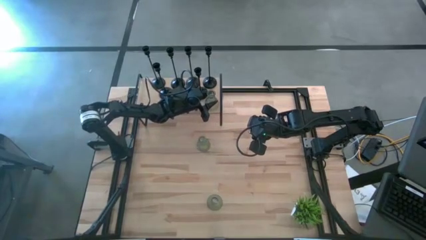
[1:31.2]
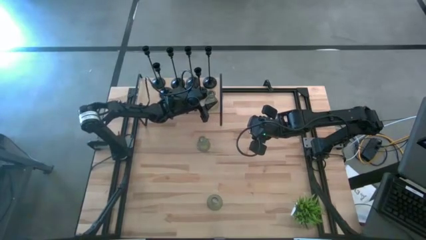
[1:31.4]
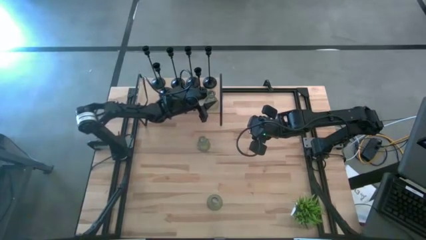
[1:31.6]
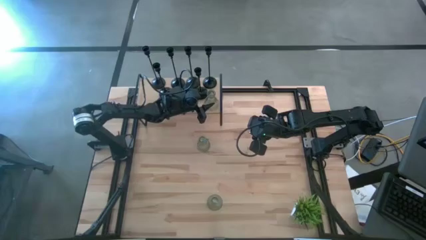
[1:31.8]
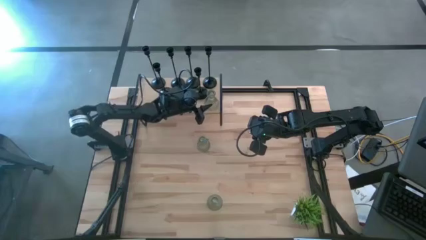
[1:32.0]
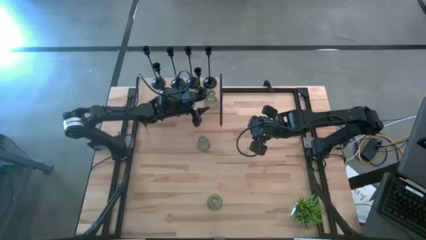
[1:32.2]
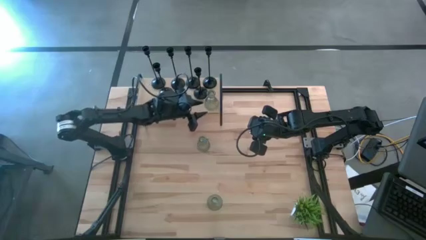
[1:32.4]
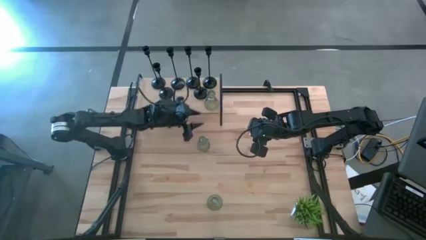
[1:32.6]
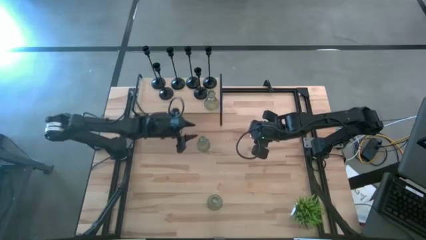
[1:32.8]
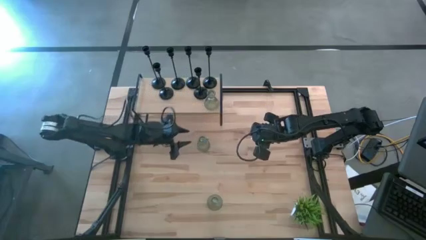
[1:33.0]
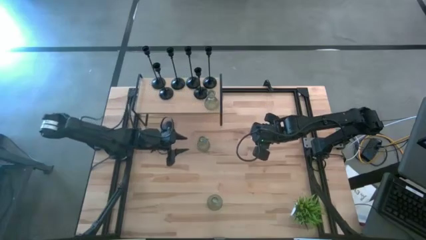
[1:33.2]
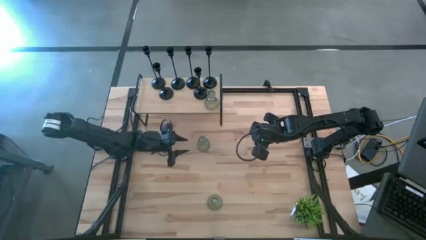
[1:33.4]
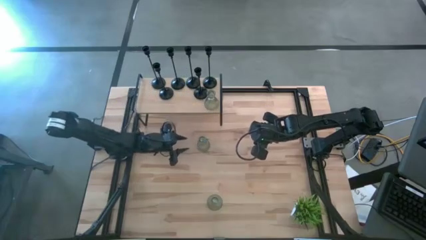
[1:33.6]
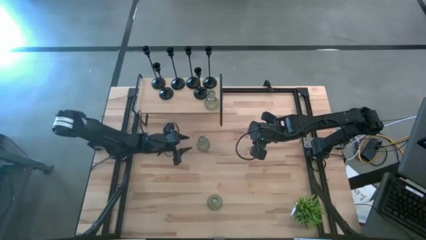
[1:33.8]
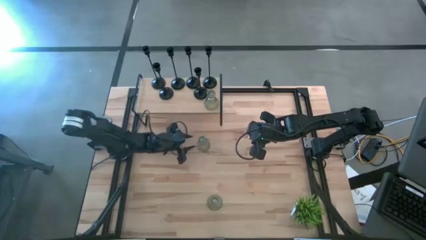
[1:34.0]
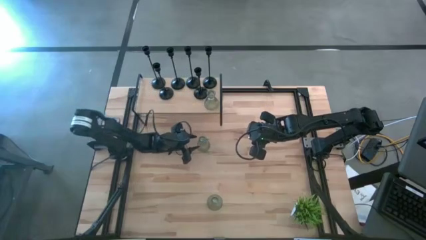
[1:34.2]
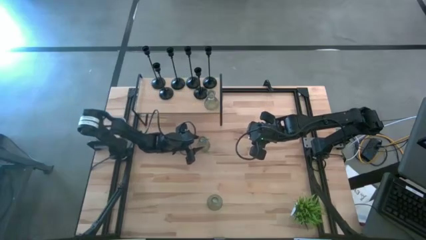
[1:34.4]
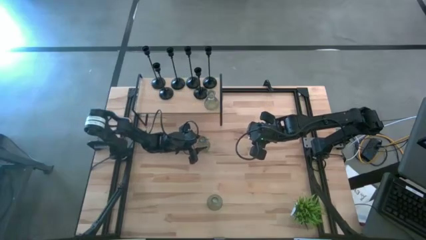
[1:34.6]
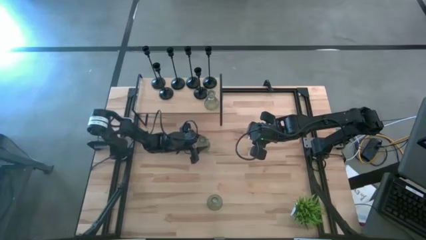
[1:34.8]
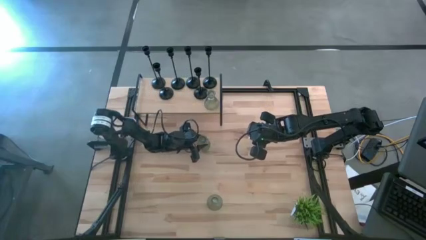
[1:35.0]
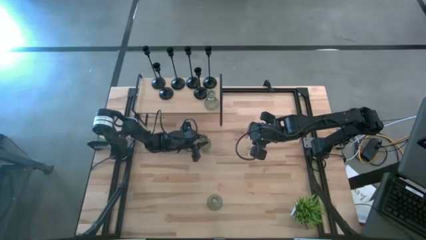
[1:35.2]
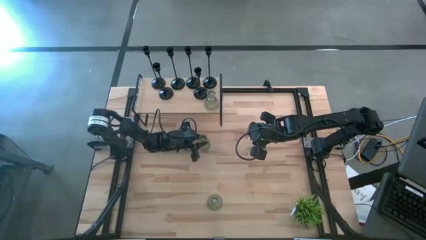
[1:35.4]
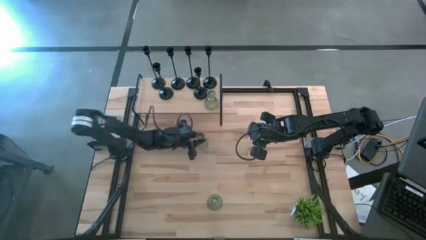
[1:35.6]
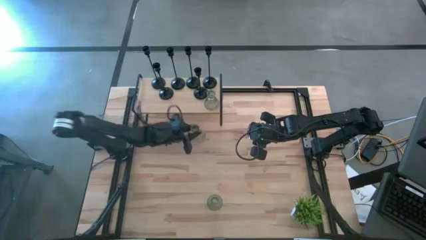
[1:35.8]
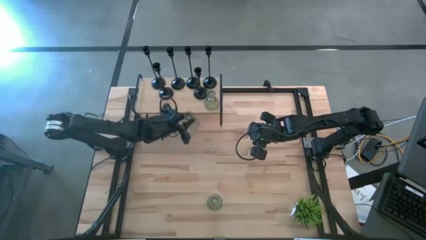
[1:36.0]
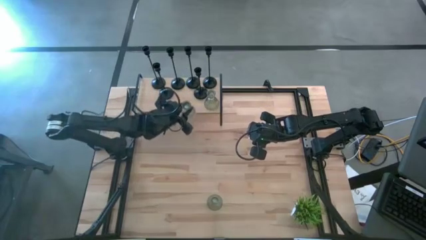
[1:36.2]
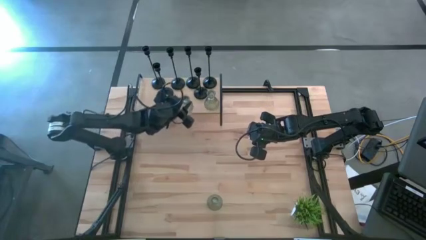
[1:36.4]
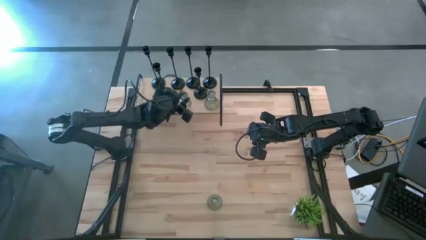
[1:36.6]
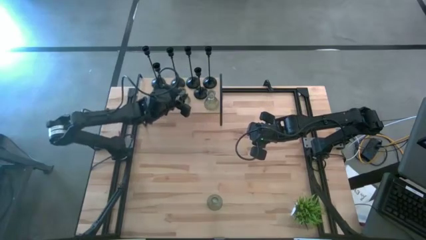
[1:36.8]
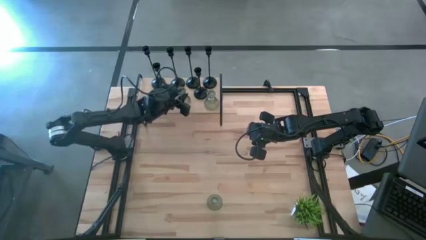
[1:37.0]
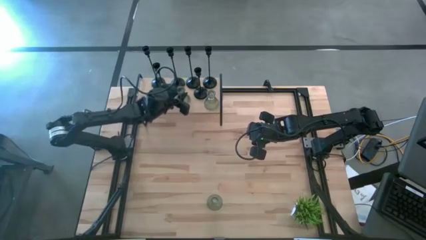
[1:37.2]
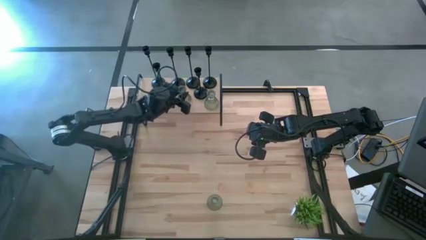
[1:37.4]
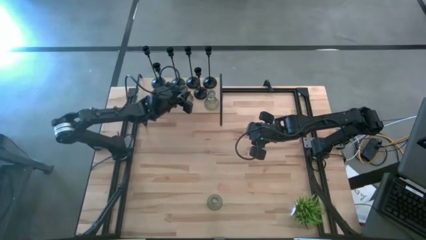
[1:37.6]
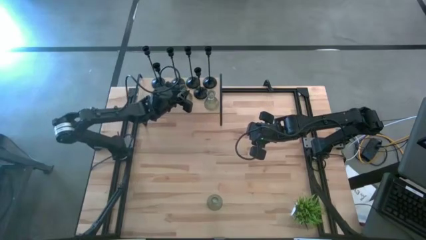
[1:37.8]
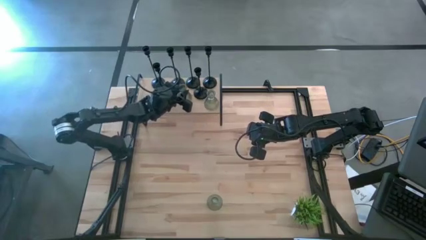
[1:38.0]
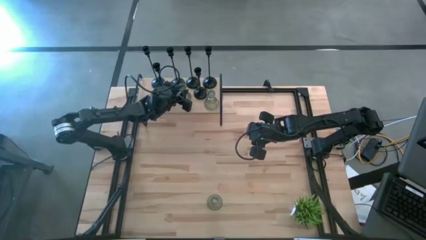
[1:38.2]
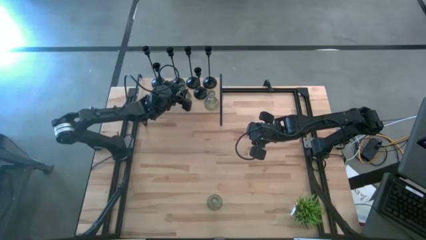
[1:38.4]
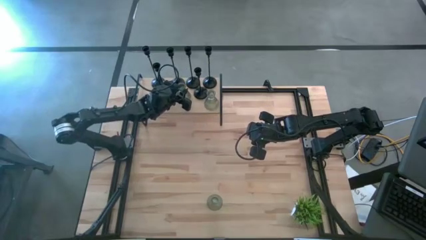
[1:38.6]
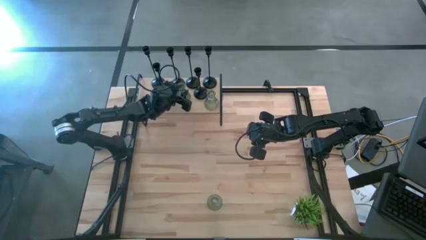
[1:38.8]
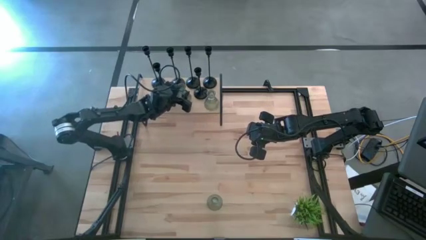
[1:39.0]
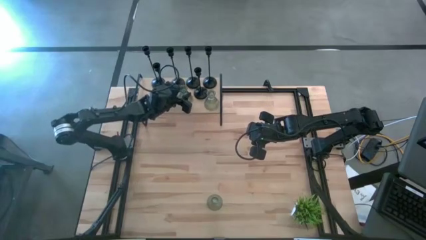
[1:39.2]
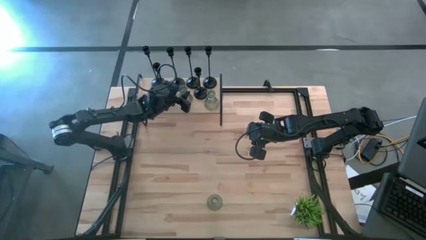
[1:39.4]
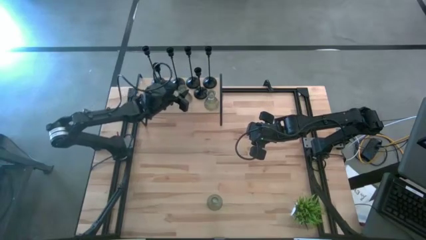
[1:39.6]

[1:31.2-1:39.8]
Task: Pick & Place candle stick holders
Put the green candleholder on the shelf

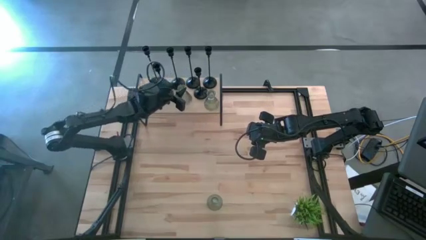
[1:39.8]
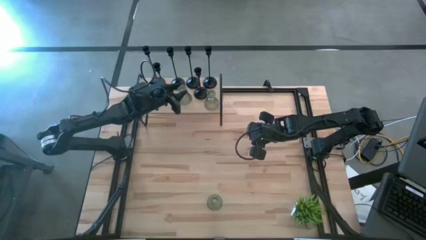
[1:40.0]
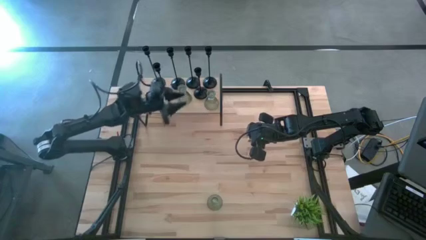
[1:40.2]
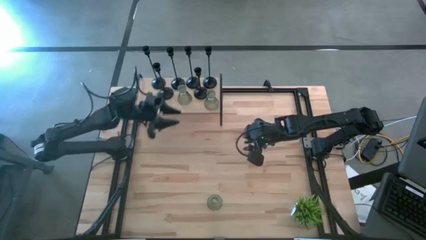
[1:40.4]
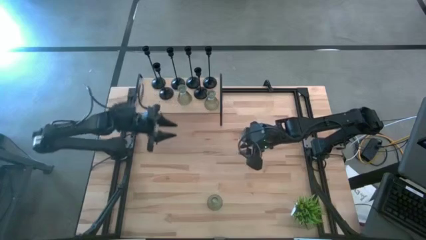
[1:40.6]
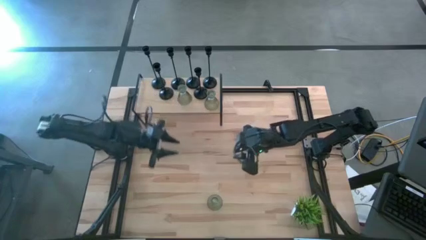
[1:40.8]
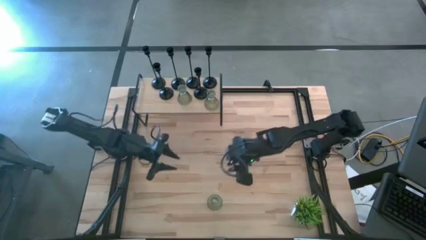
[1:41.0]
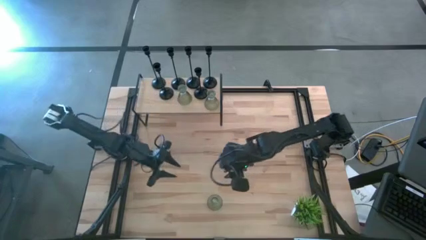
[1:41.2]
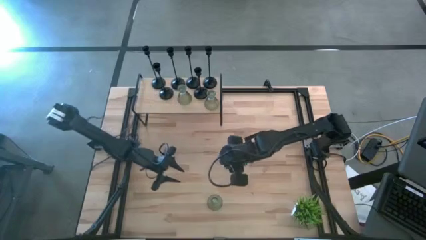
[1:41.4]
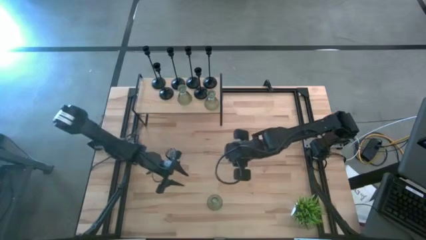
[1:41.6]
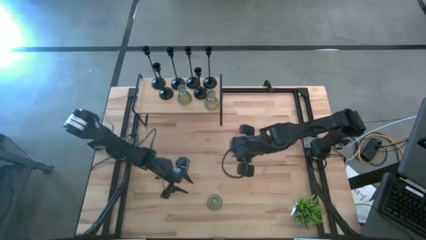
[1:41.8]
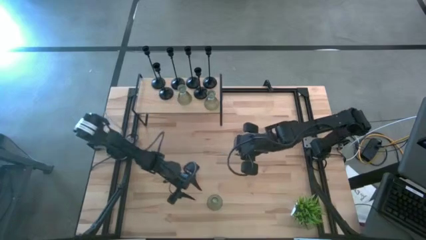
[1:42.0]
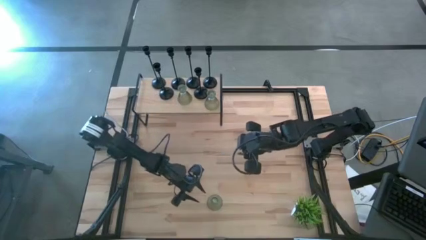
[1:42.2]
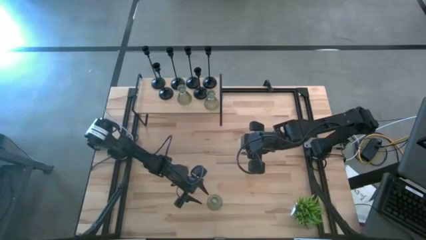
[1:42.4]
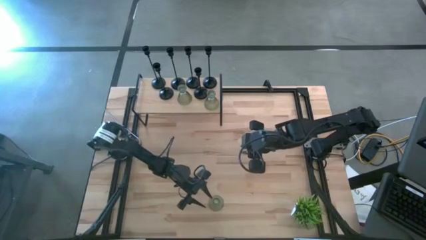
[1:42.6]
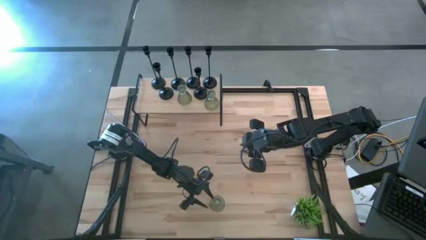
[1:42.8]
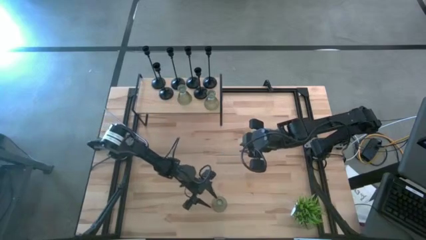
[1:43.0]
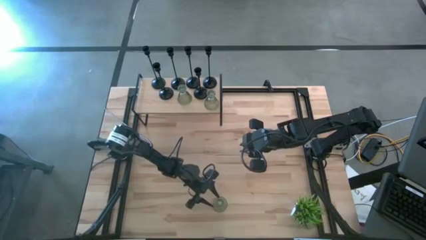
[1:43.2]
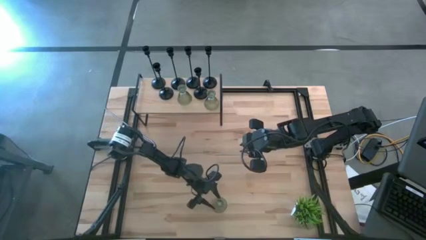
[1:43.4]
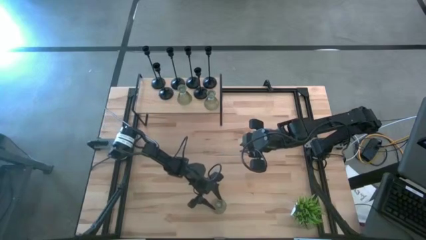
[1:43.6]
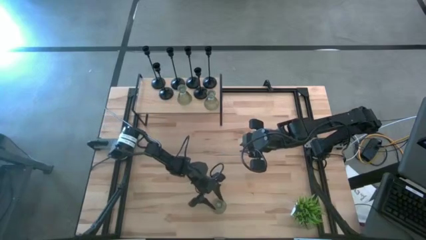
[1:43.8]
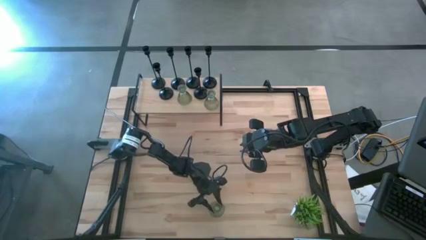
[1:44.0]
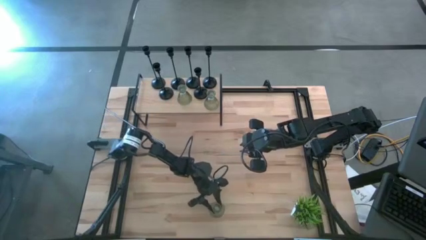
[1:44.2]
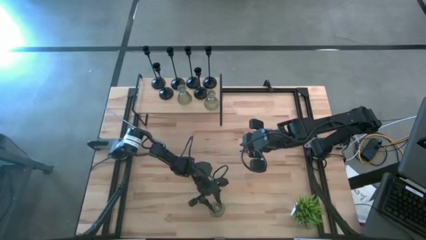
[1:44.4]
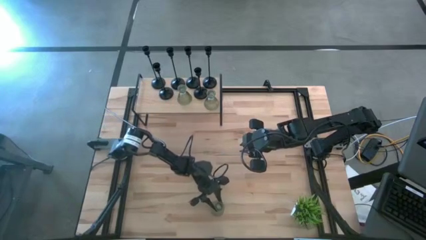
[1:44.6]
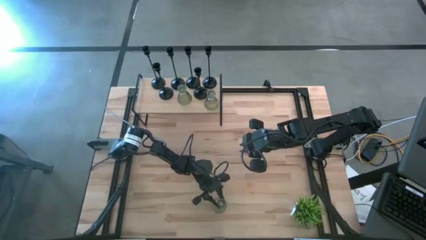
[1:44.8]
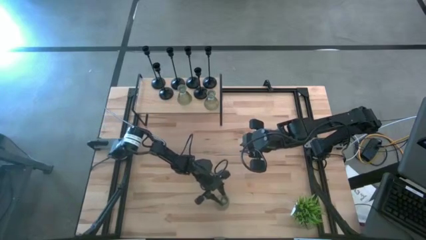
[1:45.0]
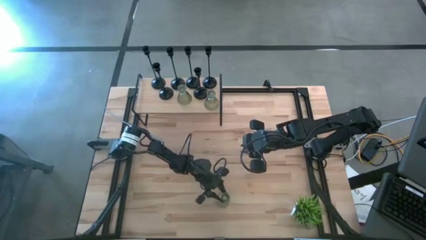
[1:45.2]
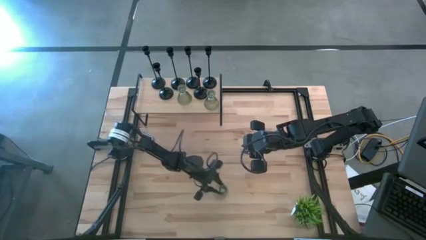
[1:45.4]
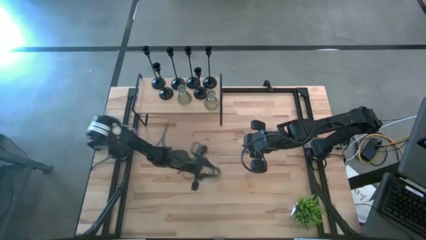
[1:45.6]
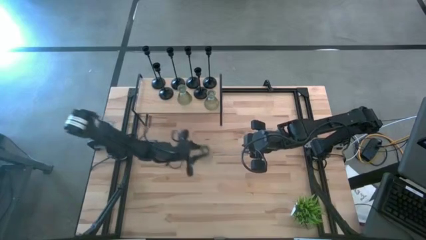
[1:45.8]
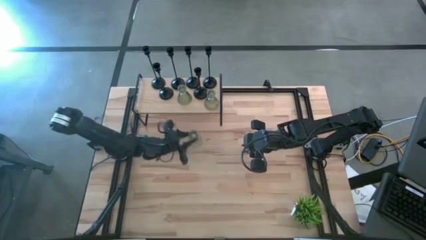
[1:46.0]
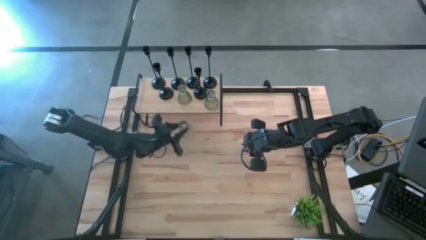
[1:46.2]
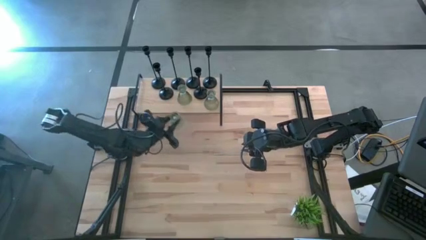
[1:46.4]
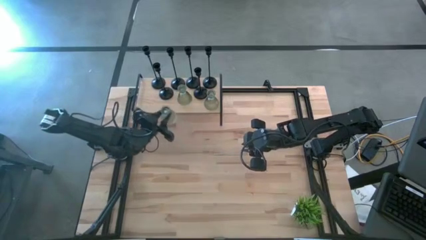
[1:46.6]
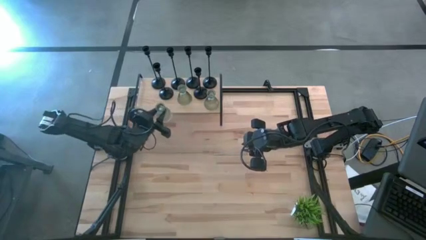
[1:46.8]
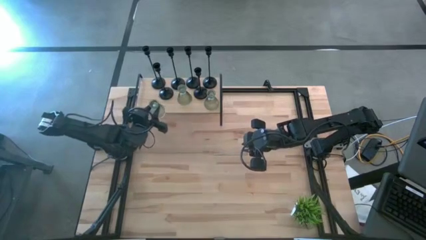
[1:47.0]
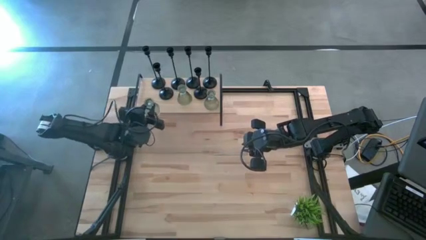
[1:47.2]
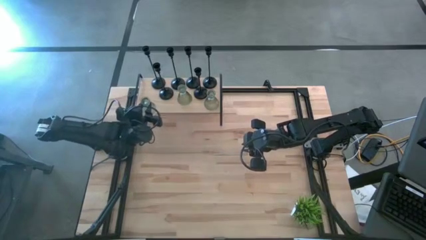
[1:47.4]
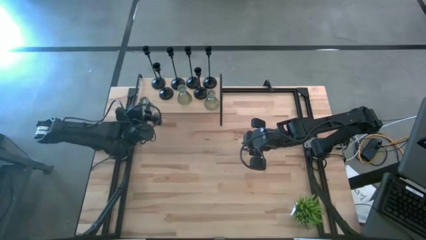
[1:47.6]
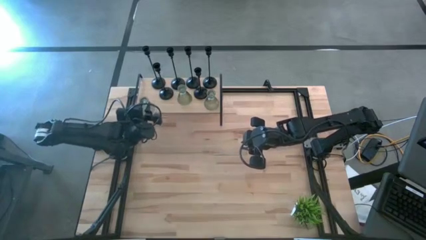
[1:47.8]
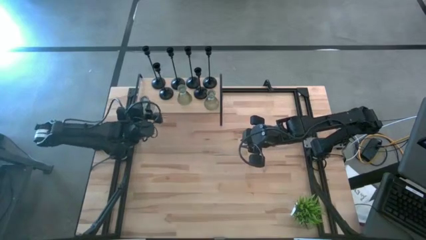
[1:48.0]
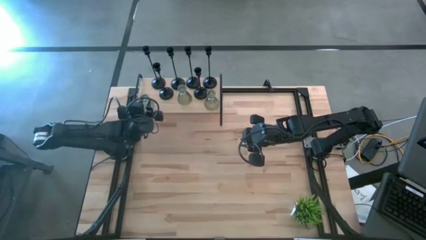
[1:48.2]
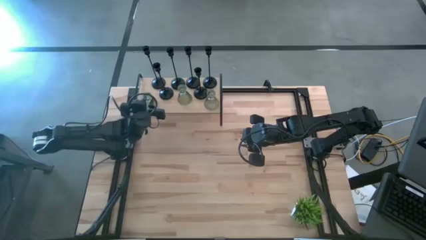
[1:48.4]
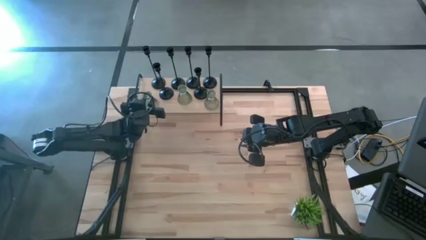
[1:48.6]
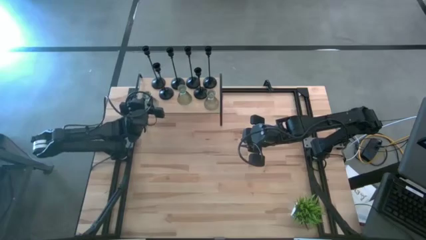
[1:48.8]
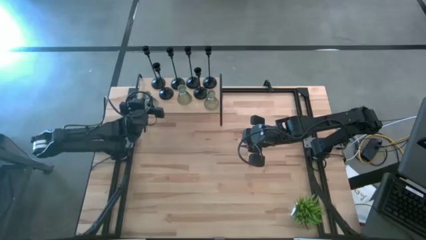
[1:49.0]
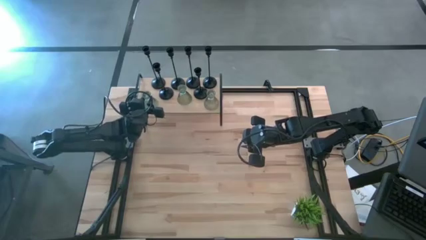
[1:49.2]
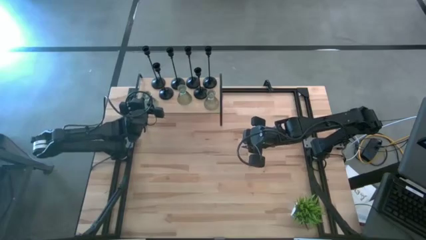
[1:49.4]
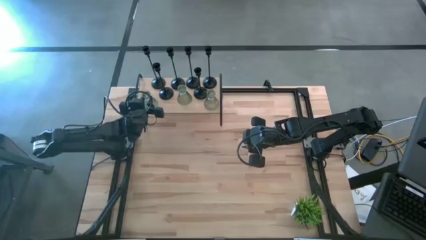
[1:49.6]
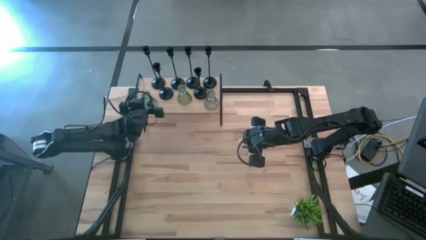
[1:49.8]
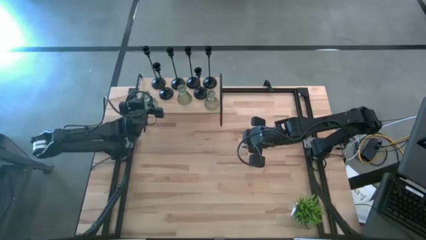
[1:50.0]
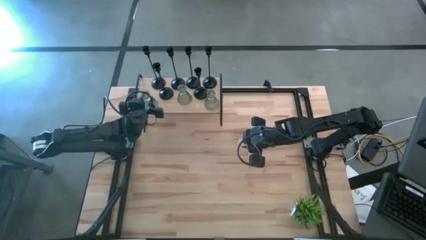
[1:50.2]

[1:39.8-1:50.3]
Put the green candleholder on the shelf
